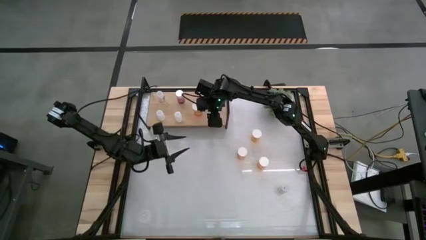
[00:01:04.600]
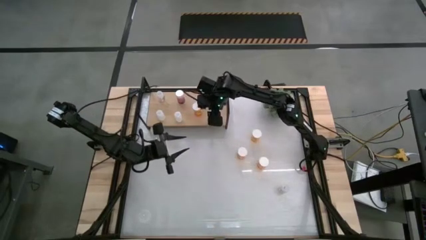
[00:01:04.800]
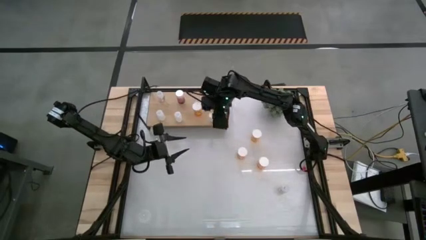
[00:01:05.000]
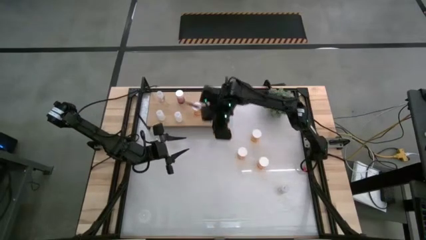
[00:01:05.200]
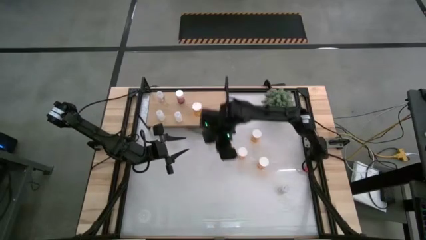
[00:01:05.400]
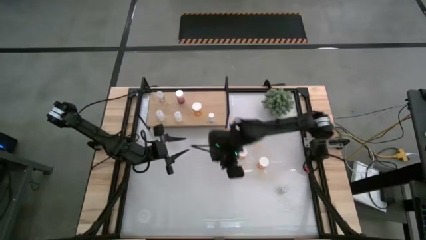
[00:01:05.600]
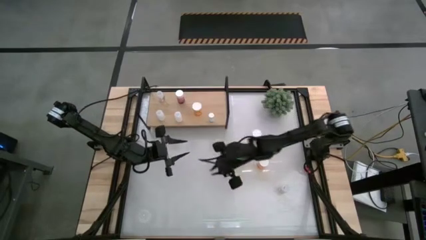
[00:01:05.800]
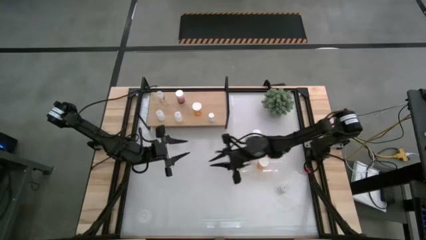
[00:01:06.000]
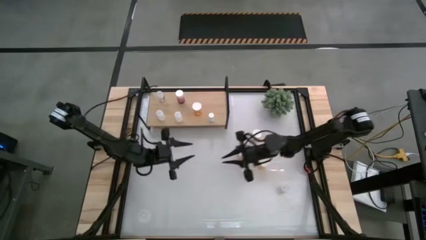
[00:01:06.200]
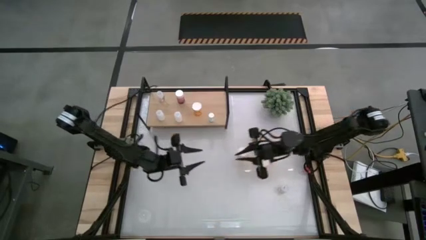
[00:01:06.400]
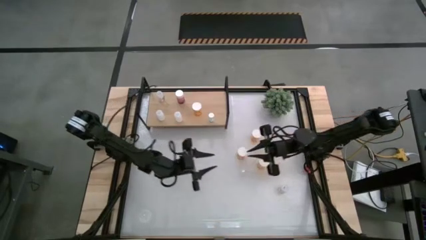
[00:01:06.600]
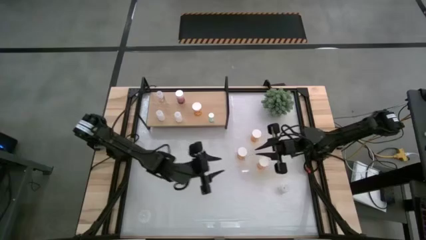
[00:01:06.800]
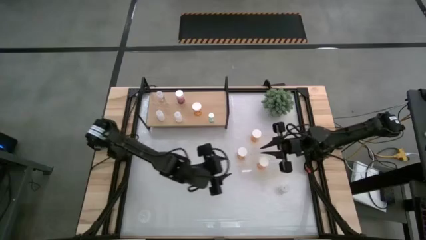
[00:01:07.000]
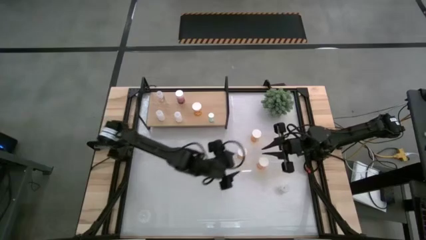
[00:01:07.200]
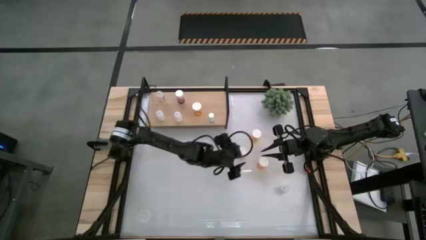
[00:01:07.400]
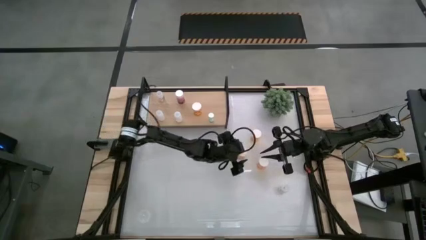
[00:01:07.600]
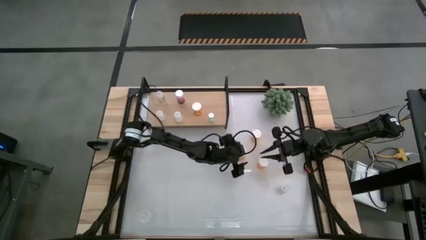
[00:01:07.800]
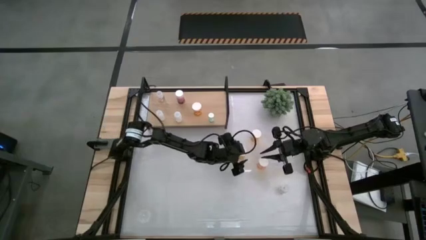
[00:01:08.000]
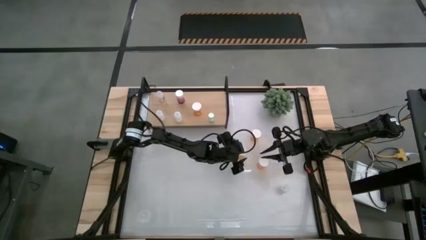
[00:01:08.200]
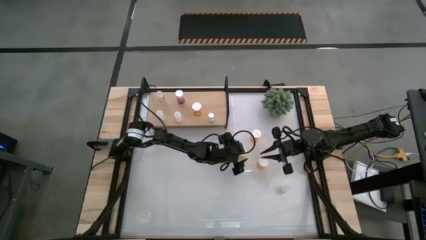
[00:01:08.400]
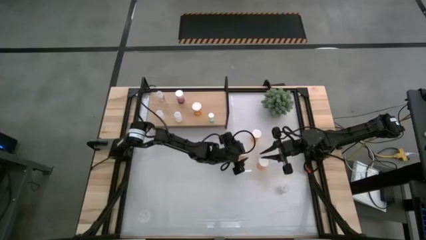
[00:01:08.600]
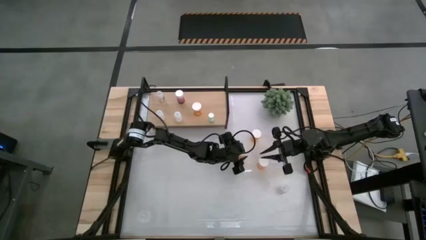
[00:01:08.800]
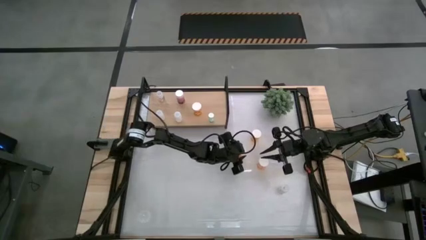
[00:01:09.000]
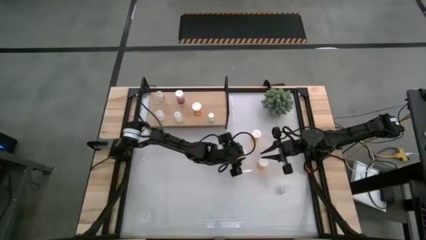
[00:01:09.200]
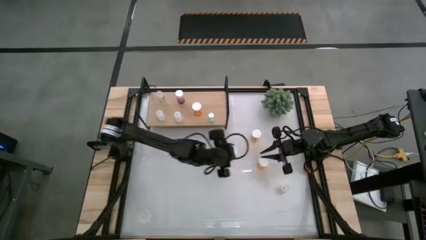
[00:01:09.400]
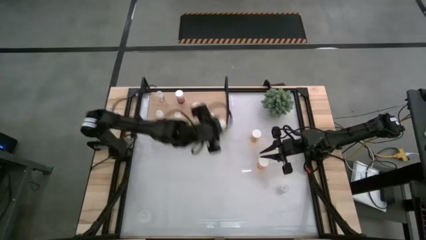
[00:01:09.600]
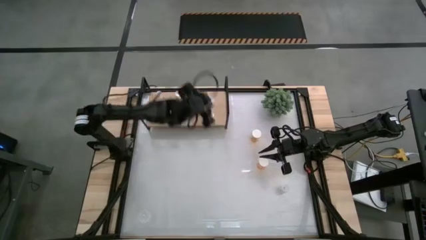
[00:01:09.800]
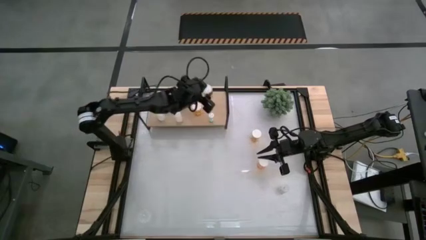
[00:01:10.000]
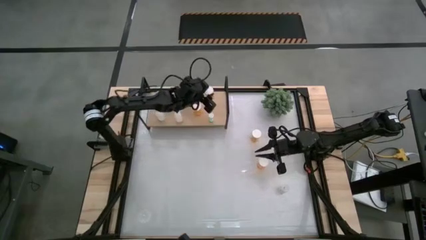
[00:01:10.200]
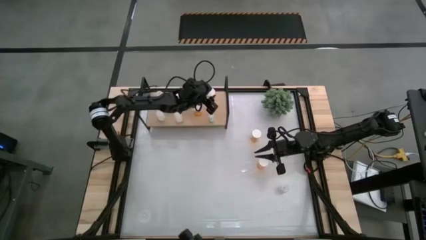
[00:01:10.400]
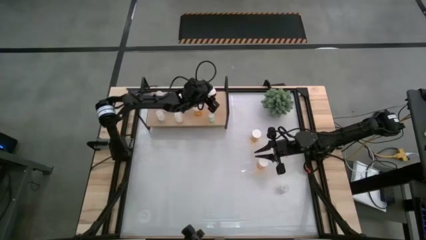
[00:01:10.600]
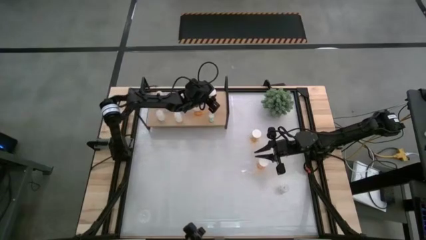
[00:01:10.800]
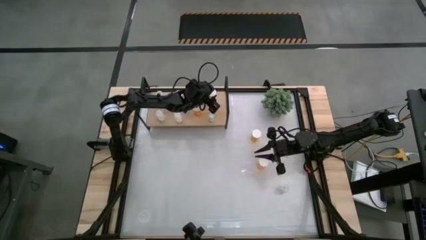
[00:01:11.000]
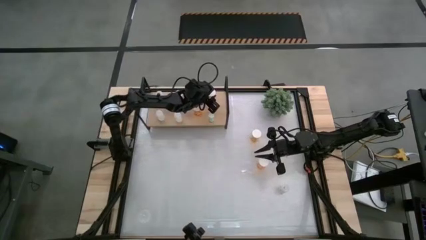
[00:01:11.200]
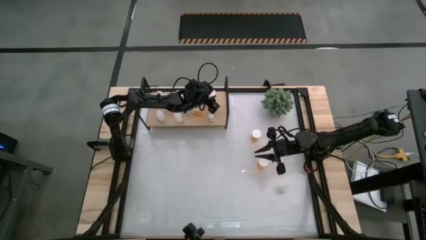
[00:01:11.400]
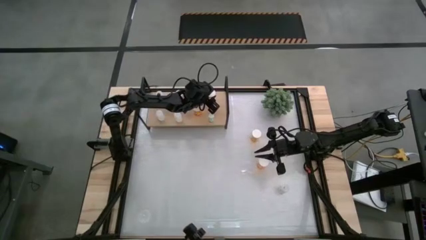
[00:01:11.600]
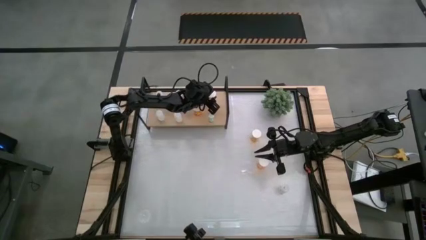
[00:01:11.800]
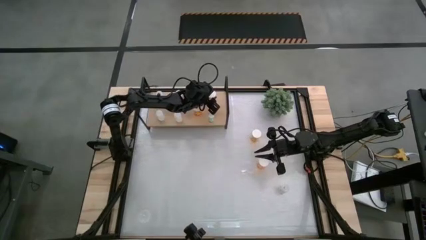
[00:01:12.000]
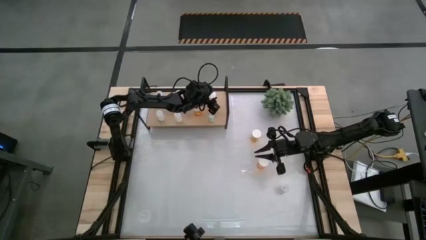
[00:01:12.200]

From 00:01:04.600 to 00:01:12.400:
Task: Pick and place medicine bottles onto shelf by color
Put the middle orange pill bottle on the shelf

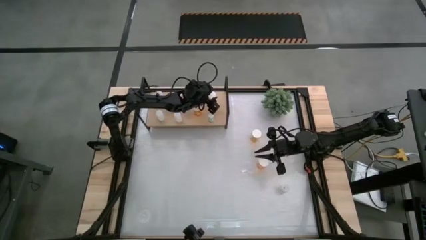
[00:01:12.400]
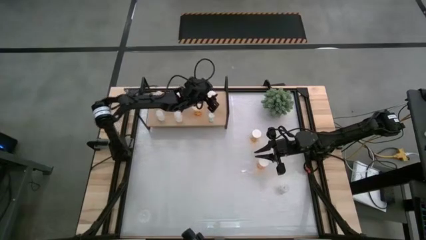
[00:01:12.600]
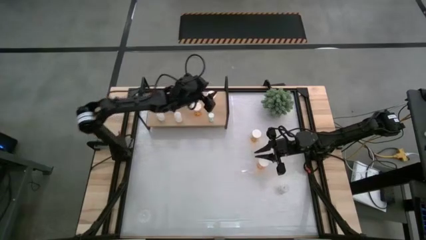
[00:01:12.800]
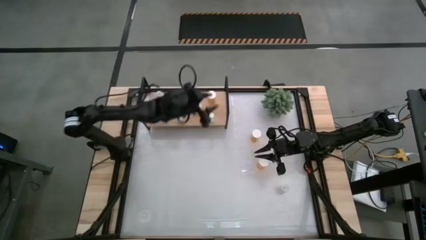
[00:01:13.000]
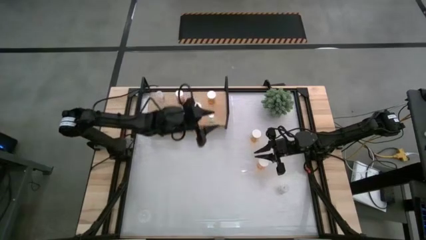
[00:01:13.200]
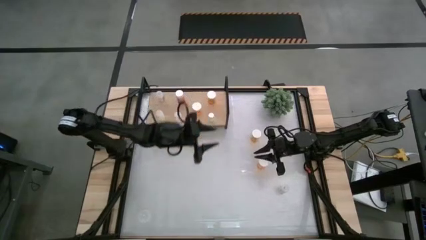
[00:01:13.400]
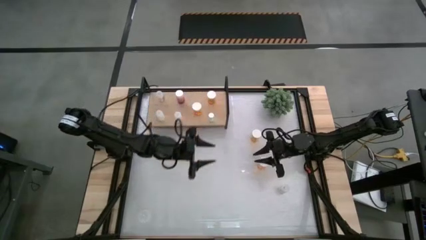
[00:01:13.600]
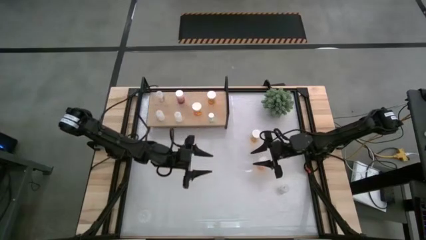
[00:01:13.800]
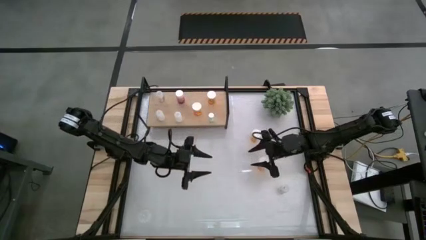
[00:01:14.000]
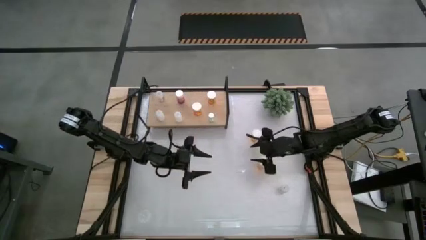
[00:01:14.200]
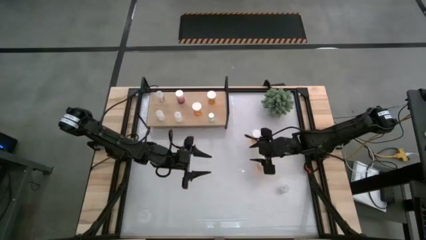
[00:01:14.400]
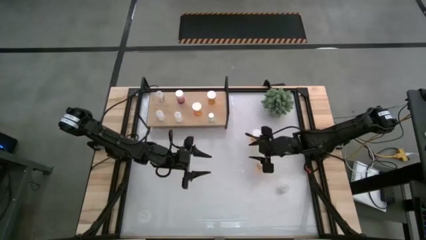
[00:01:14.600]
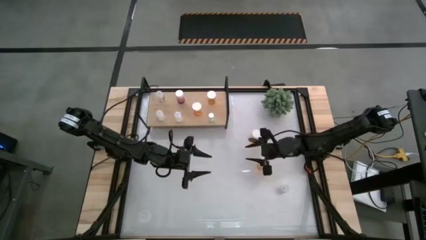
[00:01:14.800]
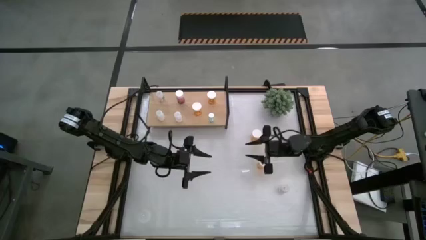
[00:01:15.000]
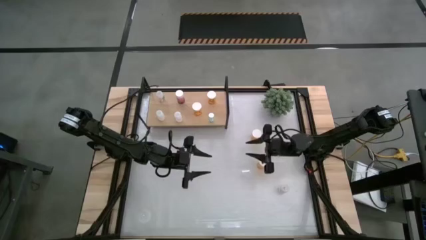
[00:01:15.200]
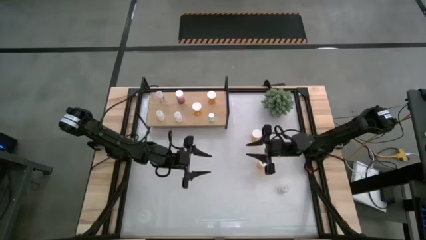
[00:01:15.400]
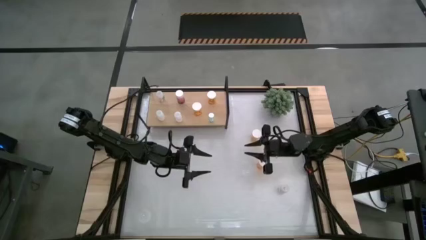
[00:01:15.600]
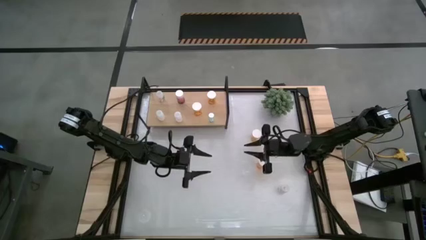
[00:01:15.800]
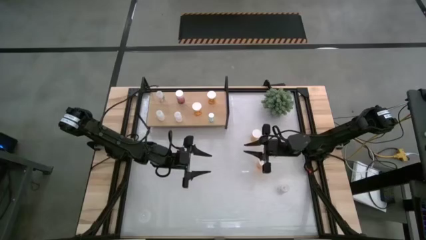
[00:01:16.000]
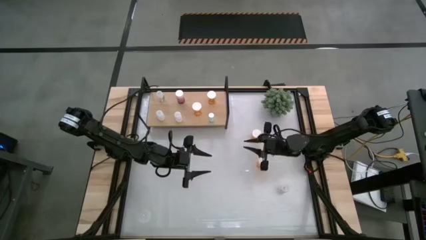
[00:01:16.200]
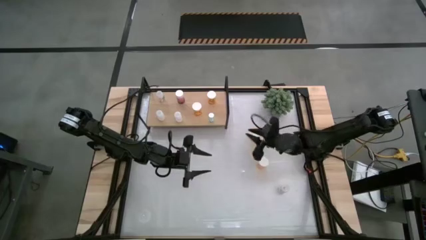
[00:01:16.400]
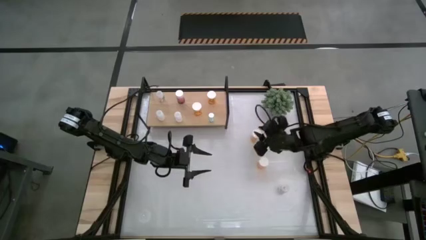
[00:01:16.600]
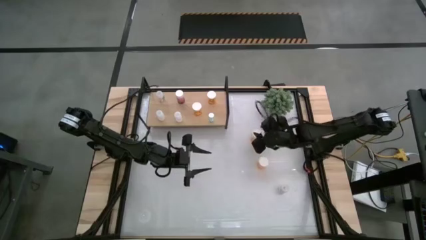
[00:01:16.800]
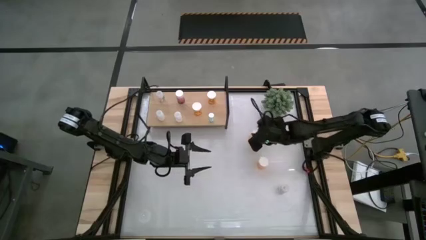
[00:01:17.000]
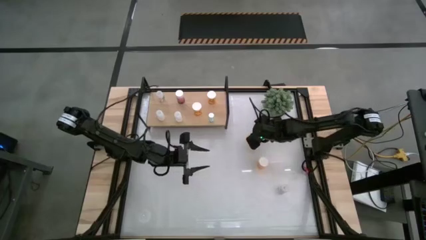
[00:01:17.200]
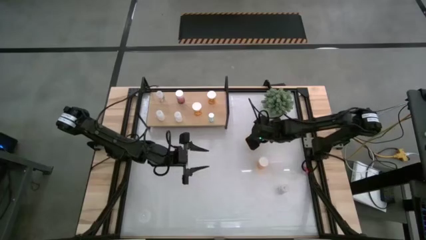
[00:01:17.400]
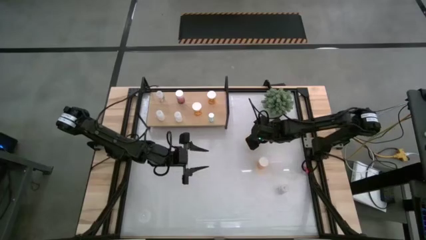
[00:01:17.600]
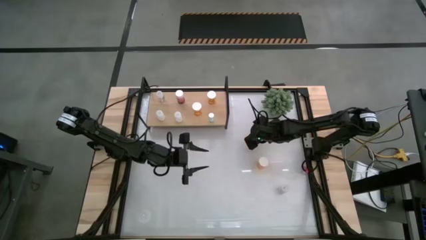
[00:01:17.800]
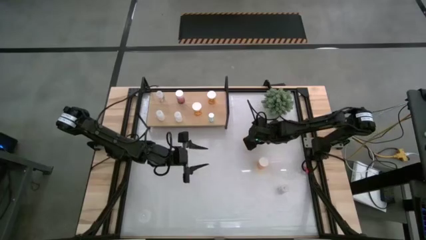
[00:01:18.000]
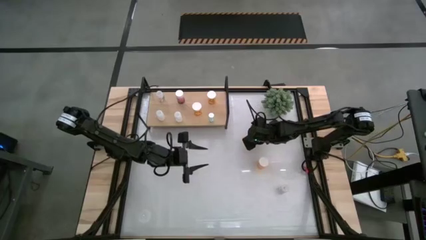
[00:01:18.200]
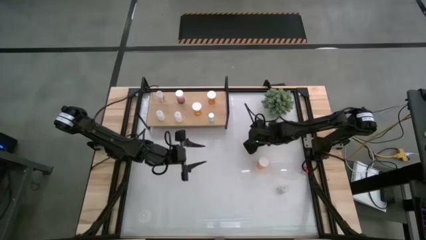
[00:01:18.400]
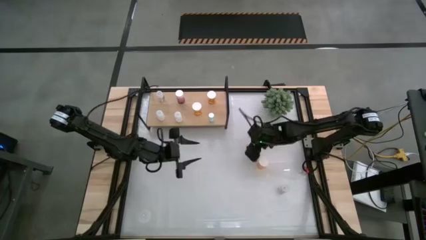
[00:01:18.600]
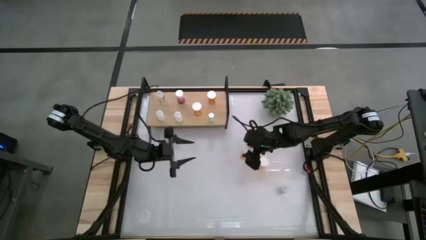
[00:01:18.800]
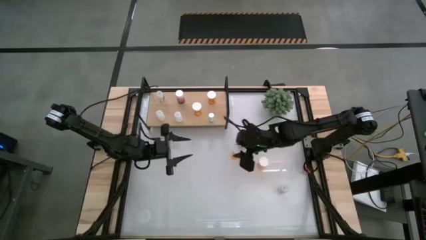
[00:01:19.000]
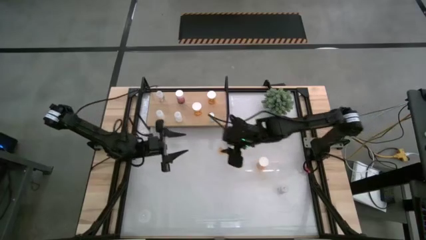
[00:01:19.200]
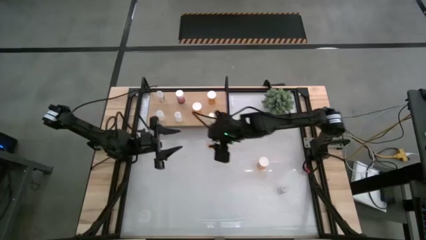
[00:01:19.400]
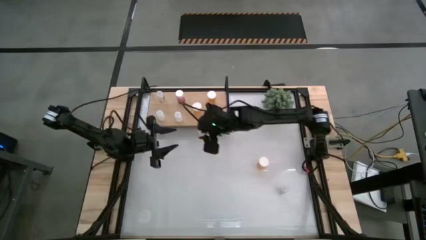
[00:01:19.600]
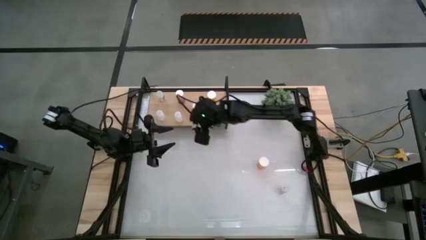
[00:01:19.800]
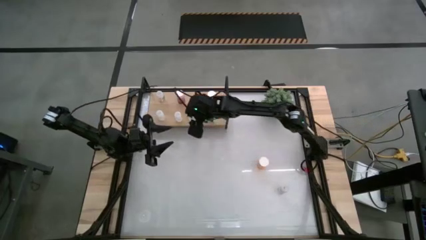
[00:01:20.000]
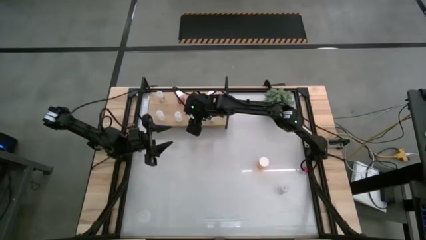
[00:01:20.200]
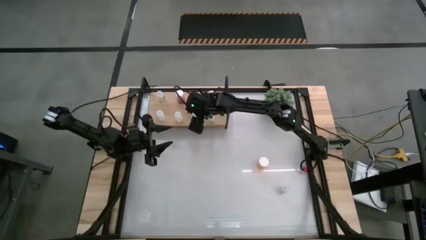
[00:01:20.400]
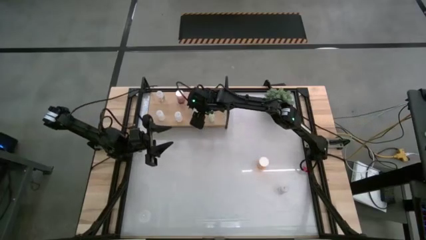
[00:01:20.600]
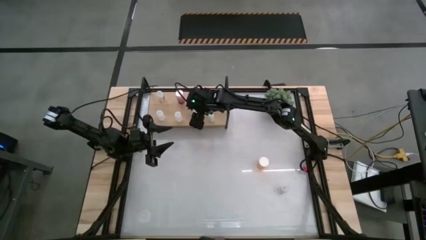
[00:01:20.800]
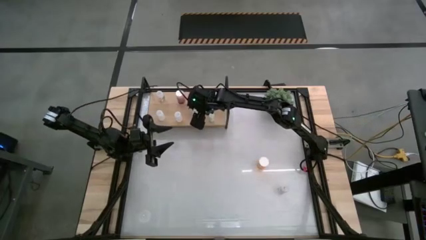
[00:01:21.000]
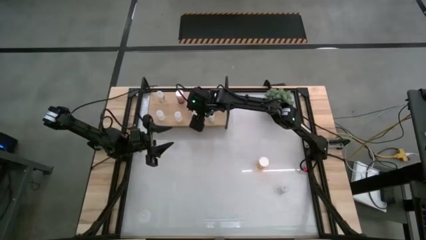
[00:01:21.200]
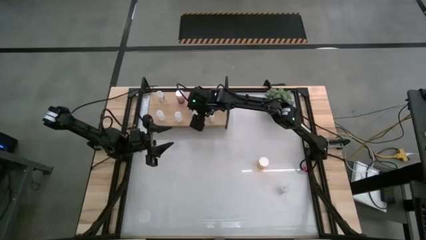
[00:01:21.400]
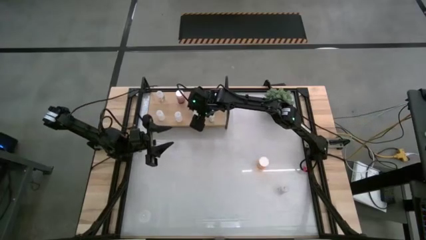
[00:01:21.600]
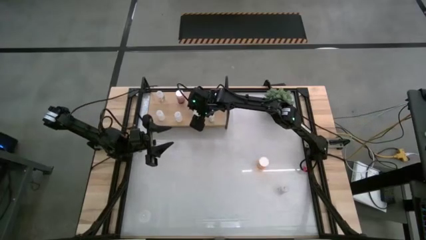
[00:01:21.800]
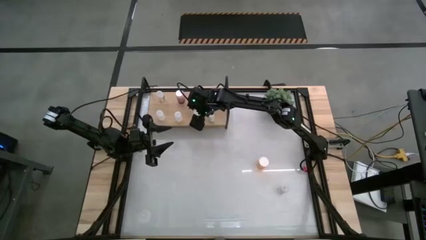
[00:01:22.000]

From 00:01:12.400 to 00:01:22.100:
Put the top orange pill bottle on the shelf
